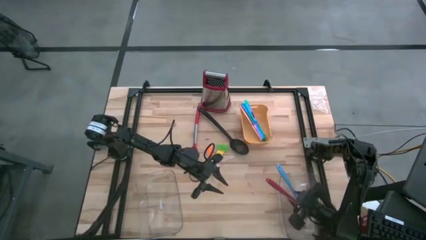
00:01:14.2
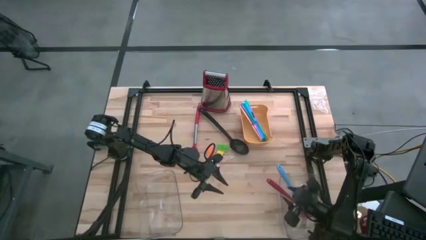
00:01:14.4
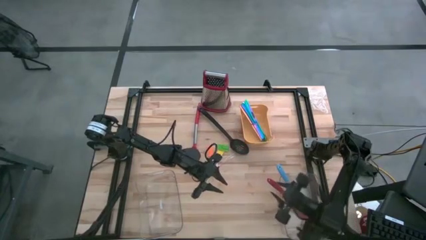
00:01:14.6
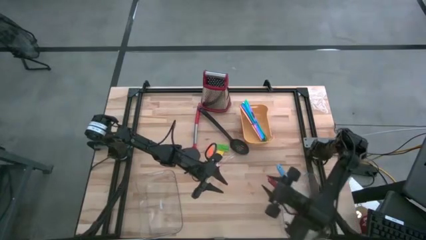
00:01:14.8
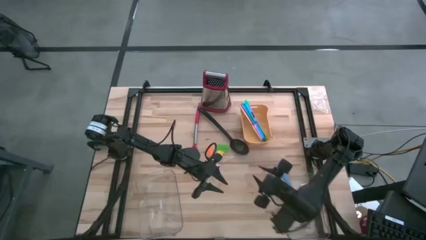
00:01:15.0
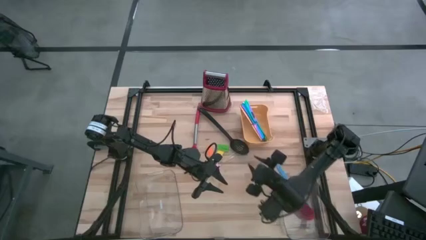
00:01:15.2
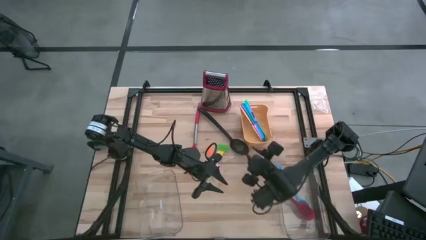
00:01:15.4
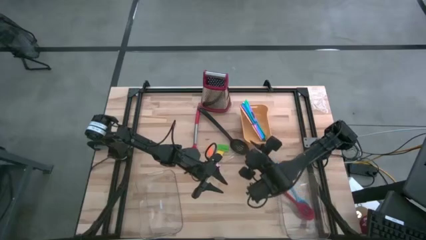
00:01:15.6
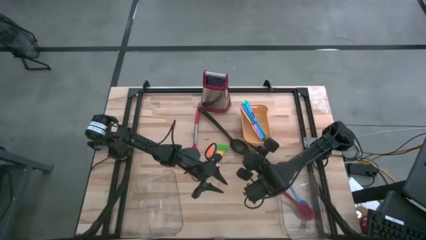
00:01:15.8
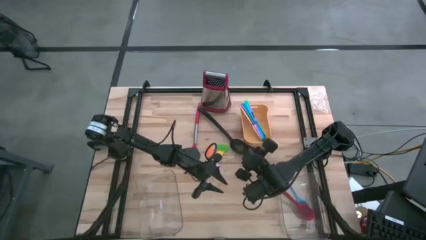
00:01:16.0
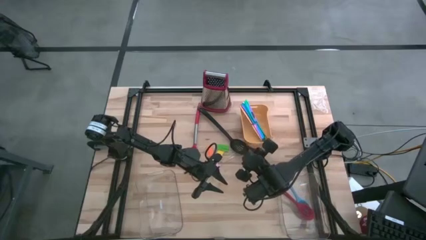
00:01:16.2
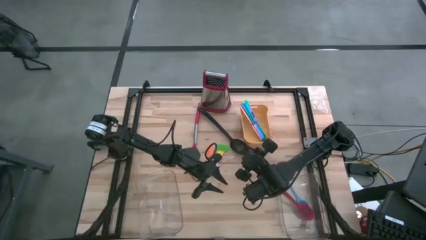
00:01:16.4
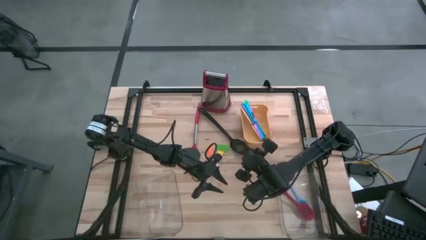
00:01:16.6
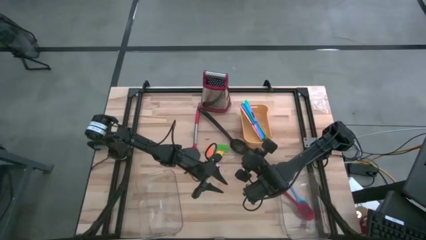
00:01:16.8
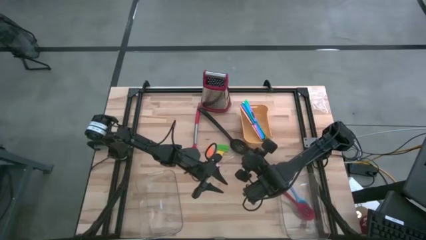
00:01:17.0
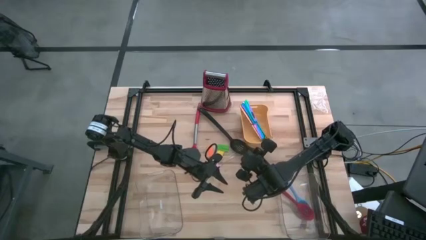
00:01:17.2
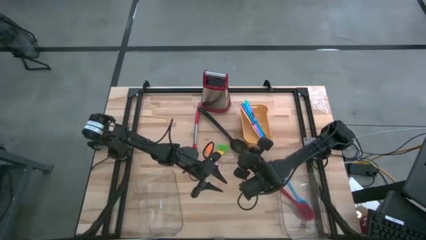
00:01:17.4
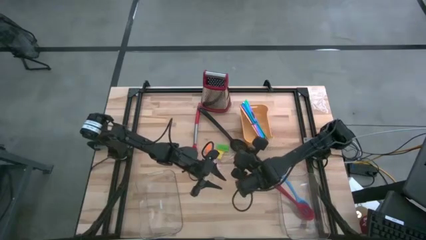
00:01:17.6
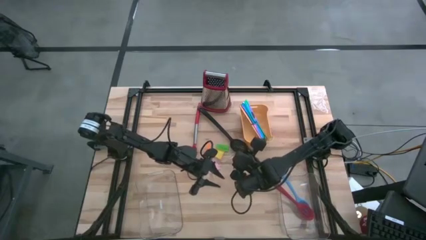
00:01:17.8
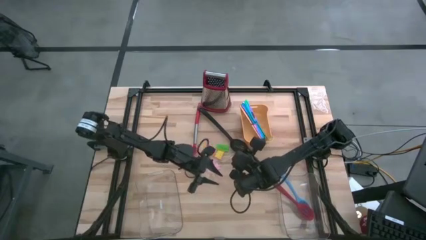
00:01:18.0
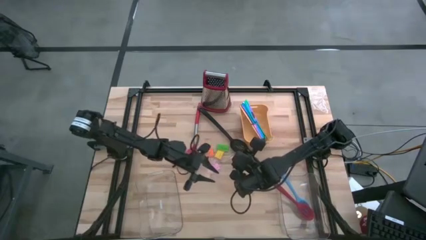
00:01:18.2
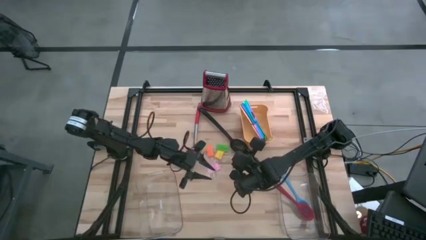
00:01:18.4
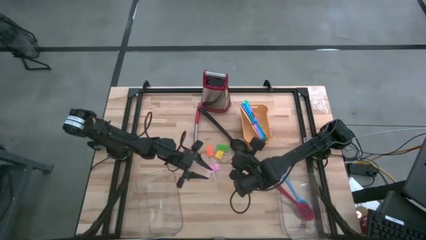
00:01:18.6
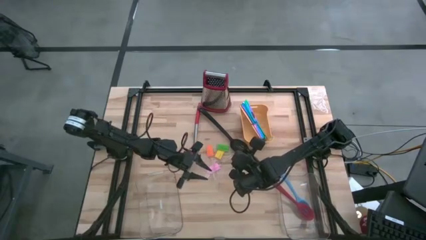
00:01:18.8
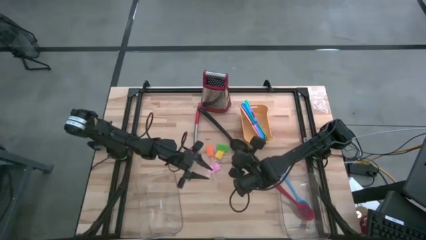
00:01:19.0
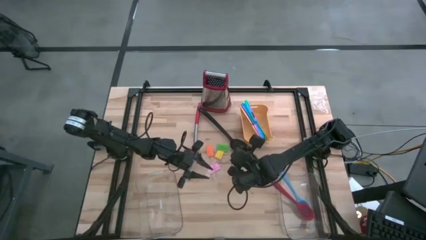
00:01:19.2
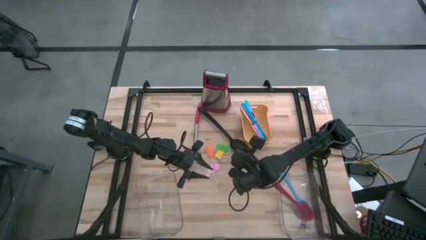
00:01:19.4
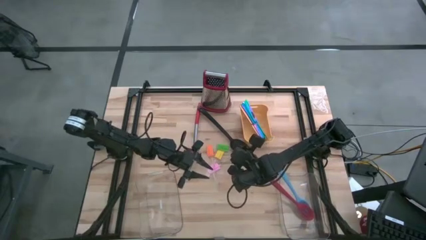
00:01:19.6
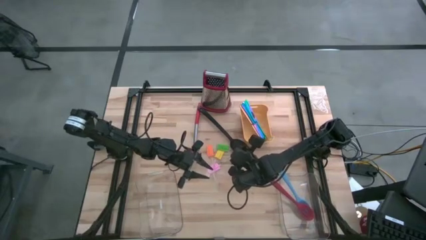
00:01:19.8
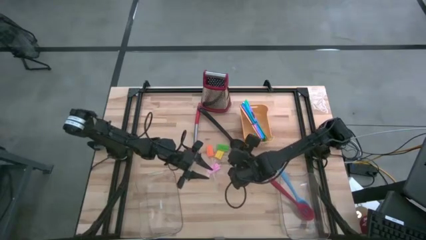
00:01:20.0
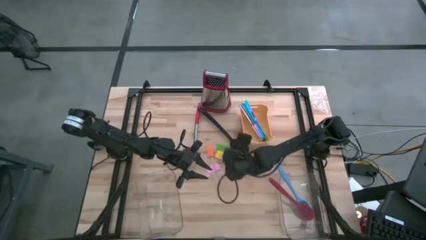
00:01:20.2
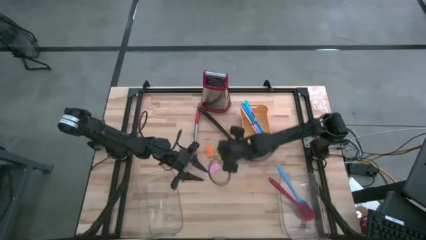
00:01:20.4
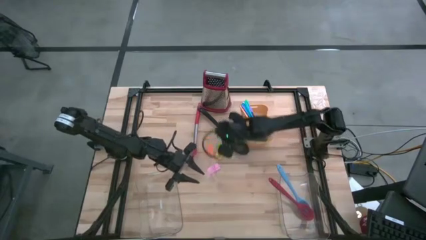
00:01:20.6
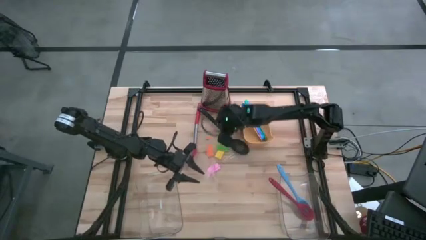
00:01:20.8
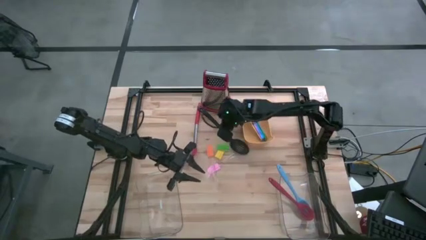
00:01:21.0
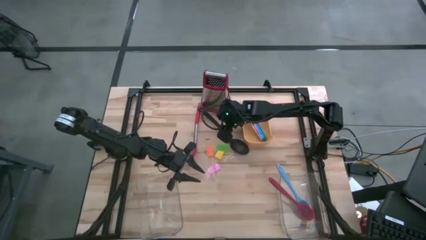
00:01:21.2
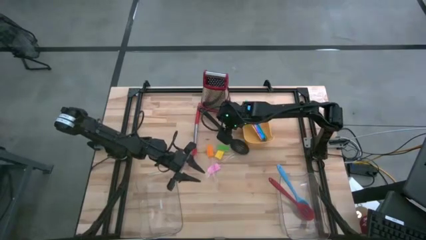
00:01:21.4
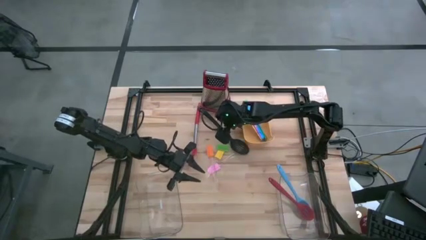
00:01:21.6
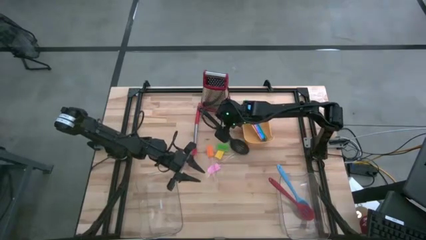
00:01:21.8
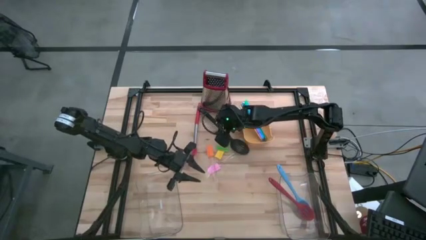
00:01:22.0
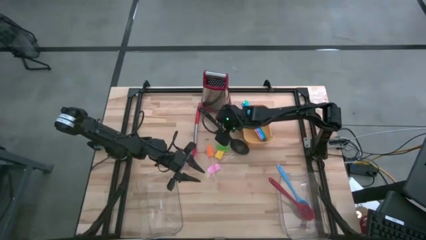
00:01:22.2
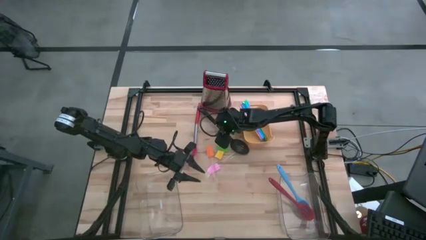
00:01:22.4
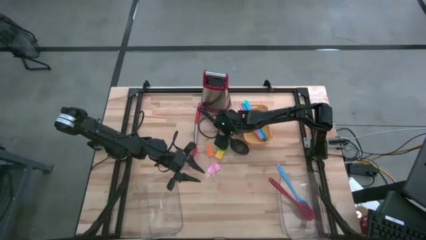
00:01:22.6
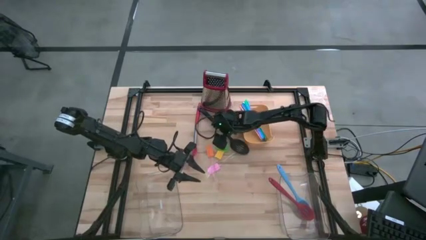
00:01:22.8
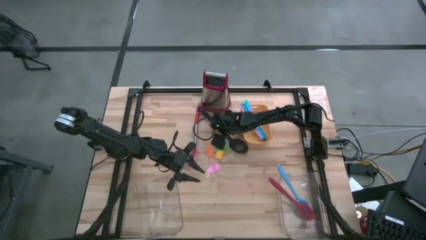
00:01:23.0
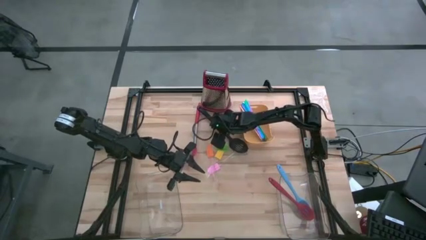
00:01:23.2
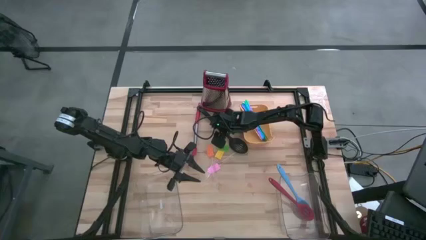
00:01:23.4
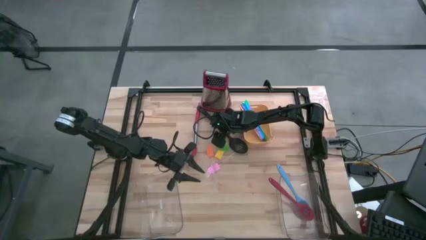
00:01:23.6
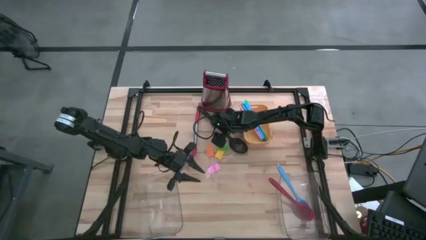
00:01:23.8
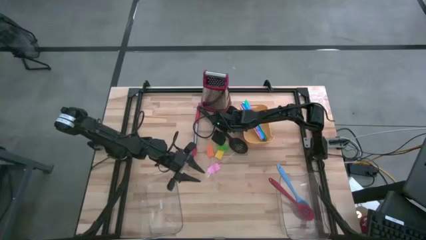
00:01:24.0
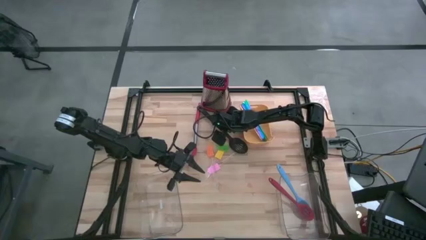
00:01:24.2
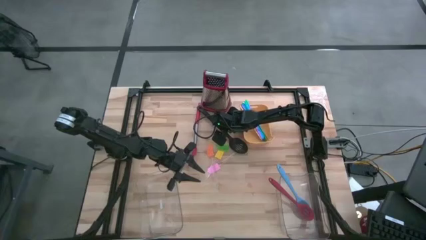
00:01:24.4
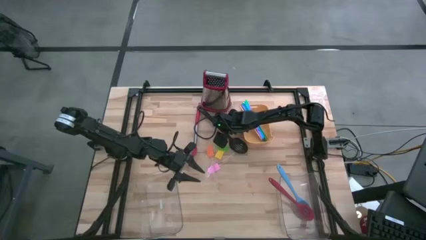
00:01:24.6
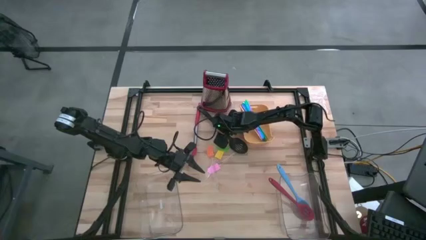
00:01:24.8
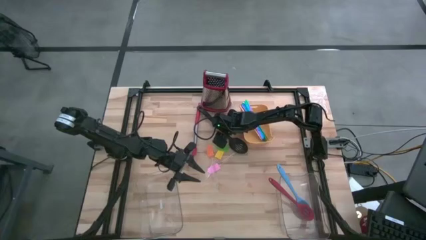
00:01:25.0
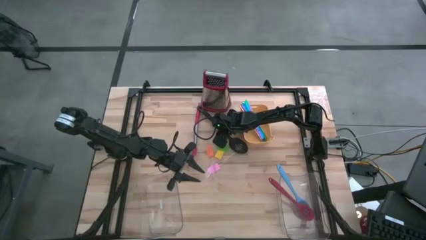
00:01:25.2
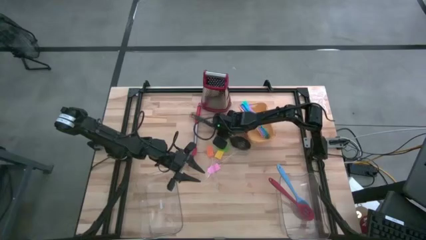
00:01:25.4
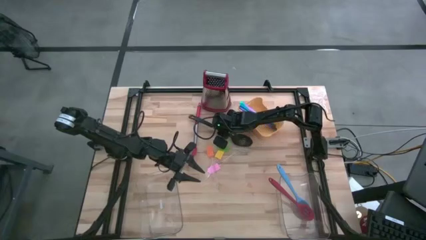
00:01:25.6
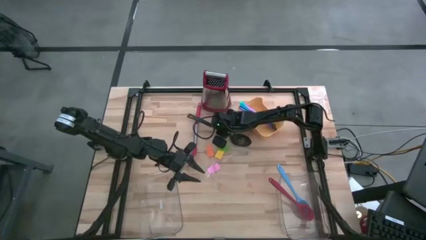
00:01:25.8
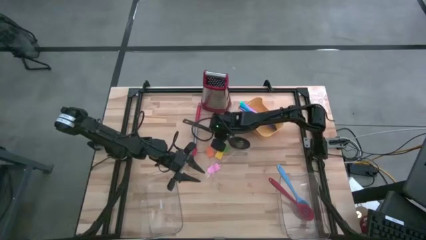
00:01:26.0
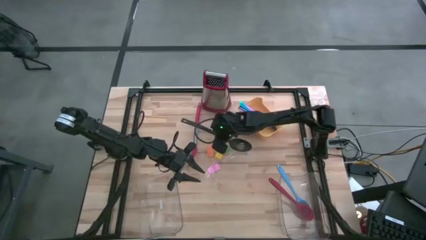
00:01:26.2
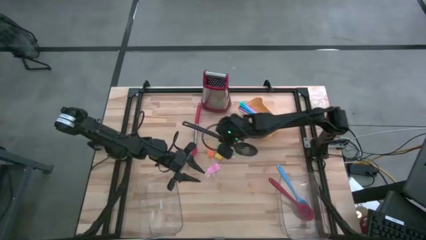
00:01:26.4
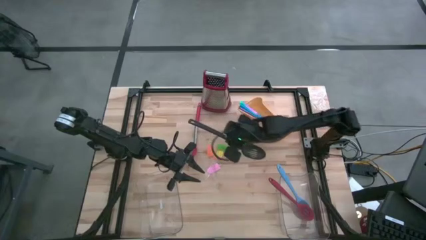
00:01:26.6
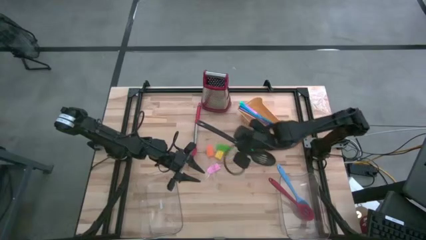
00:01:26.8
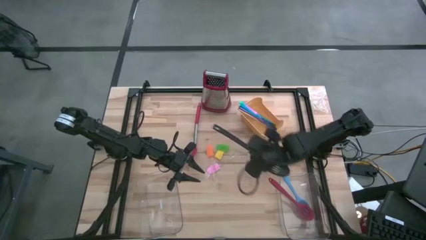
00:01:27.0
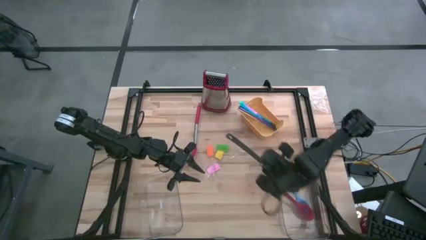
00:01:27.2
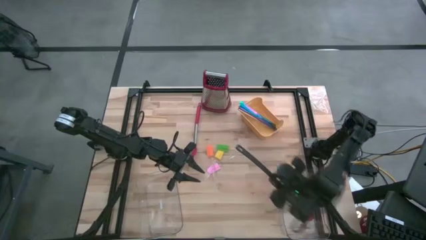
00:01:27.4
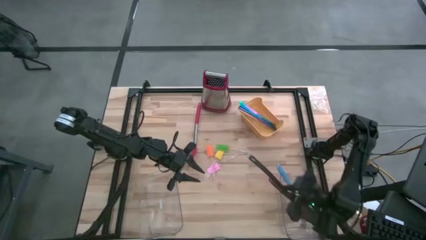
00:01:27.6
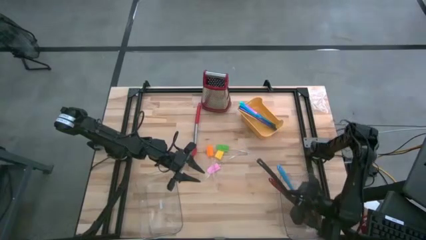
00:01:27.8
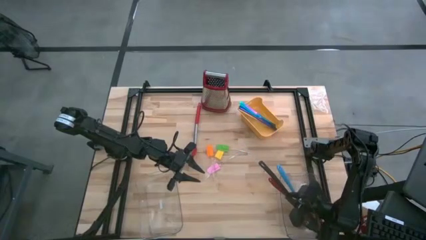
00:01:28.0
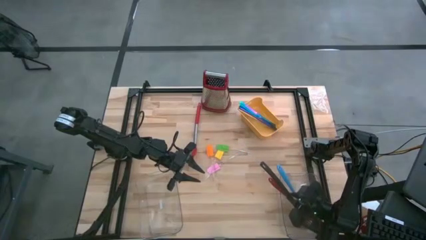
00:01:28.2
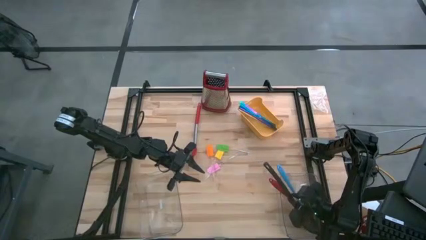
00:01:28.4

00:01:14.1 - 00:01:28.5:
Task: Pick & Place Kitchen Items
Put the black draining spoon into the right transparent bin

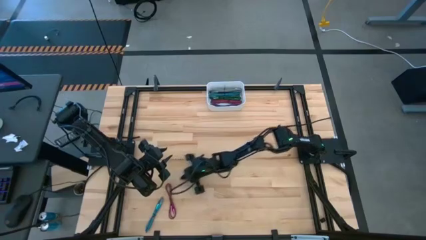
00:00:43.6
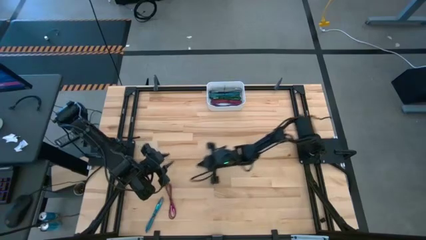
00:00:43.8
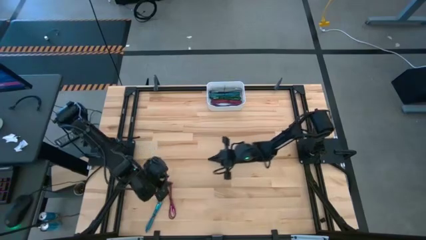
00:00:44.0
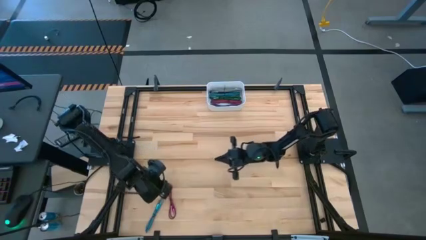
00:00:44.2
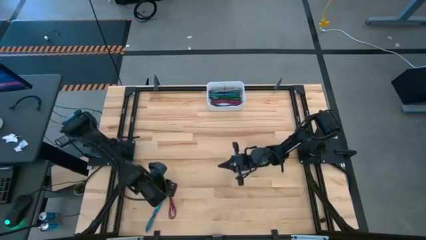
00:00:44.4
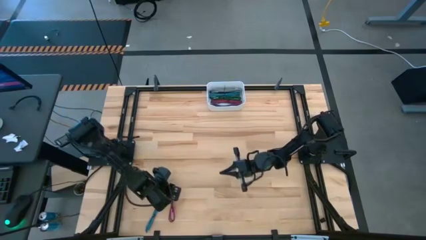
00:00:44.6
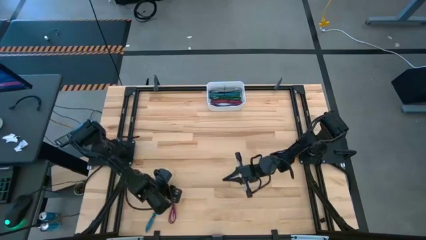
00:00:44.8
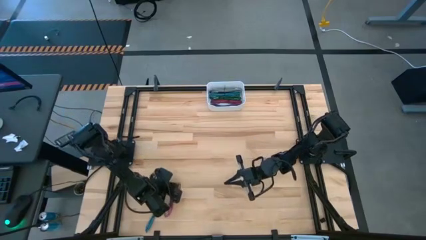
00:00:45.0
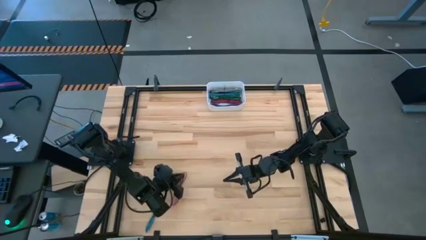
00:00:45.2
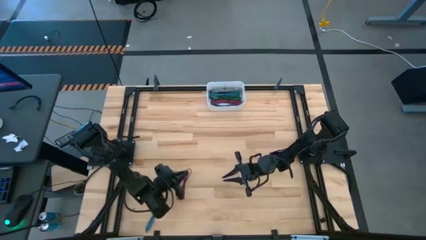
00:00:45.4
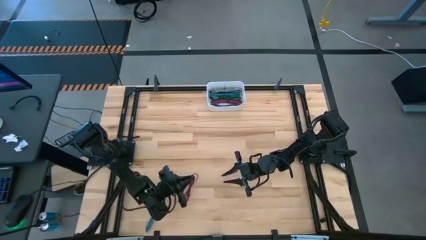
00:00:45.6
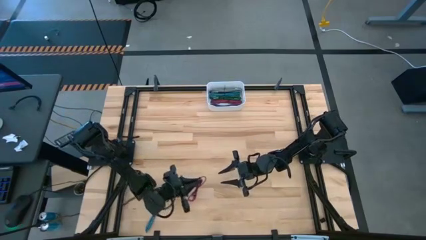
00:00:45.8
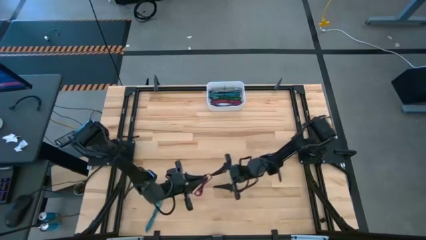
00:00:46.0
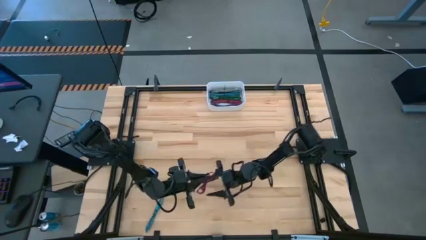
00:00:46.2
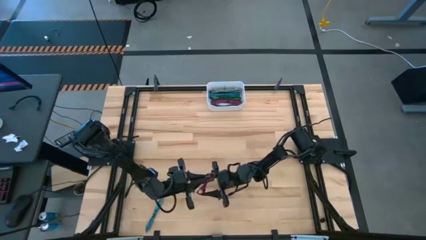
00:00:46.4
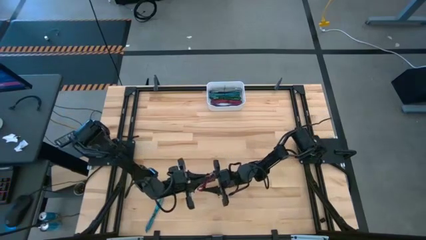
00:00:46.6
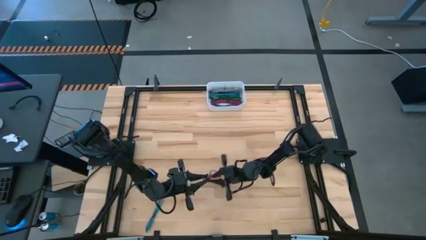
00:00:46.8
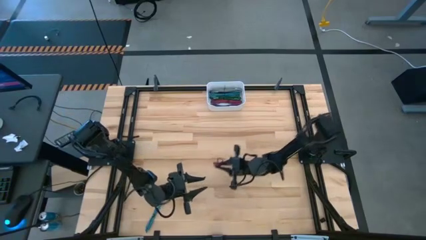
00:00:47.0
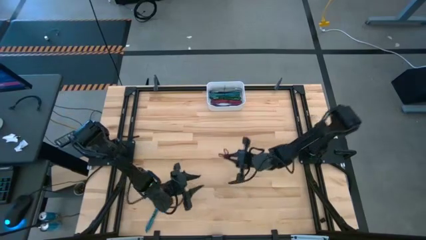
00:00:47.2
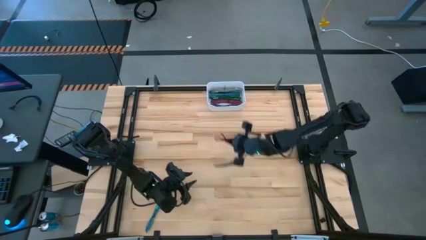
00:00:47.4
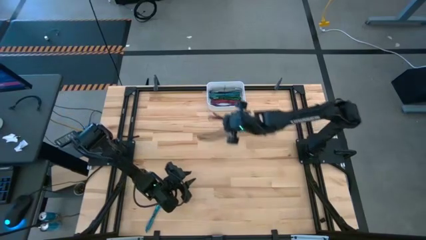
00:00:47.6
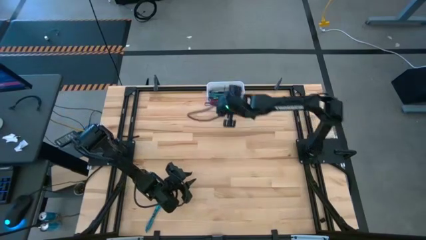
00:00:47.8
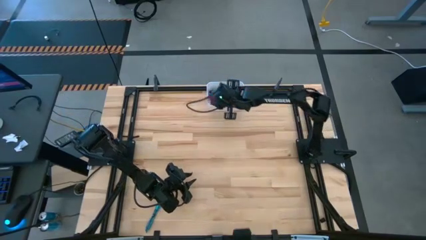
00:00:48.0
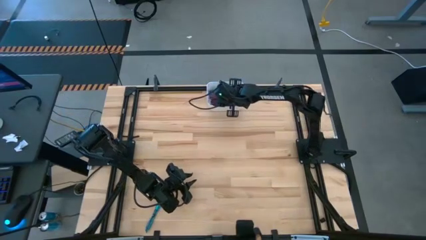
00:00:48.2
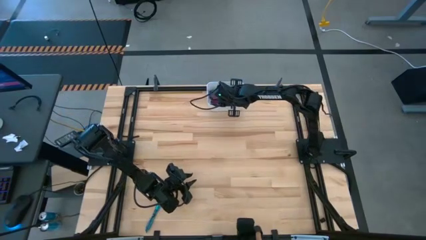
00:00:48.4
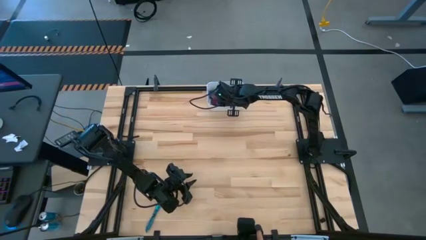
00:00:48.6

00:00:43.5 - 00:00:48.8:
Task: Pick and place USB-C Cables
Put the pink charger cable into the white bin
